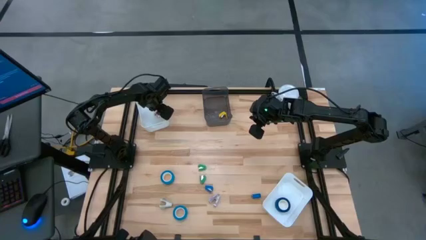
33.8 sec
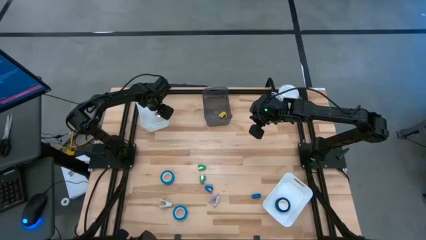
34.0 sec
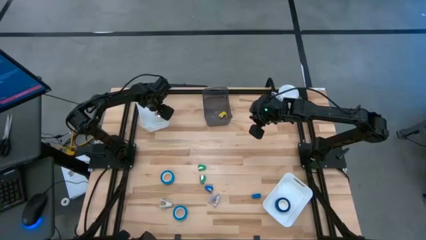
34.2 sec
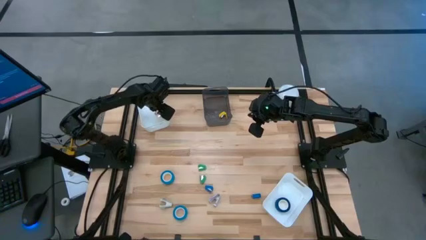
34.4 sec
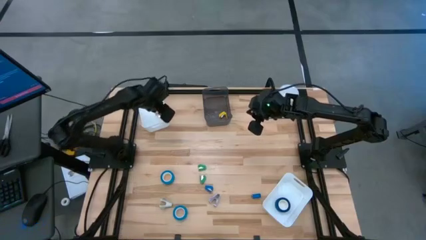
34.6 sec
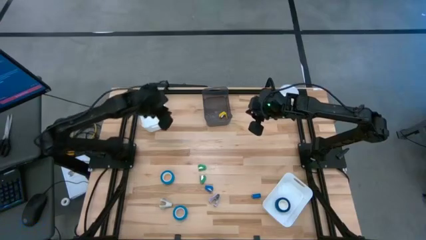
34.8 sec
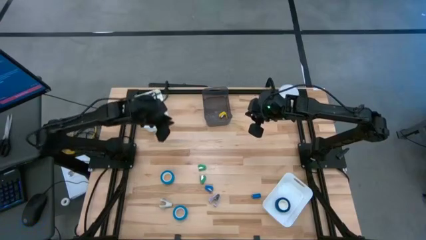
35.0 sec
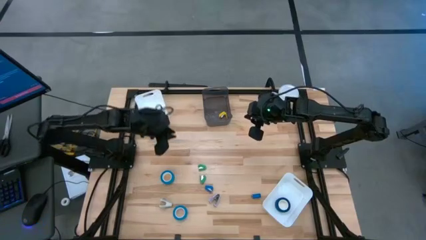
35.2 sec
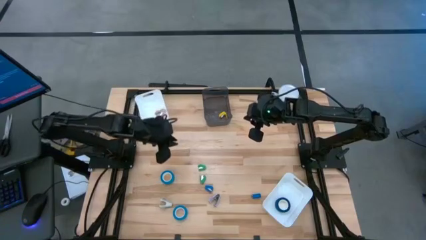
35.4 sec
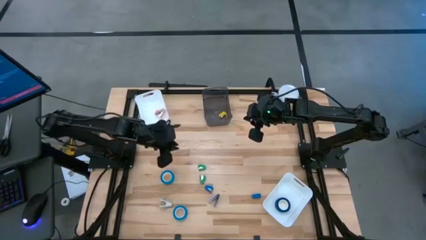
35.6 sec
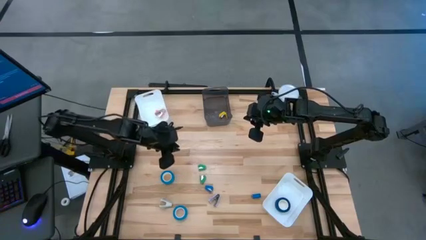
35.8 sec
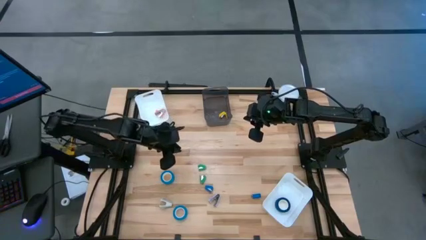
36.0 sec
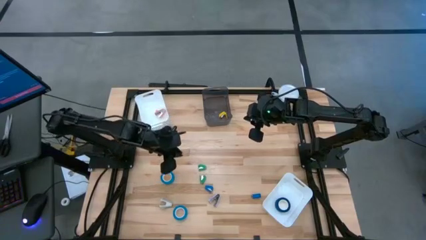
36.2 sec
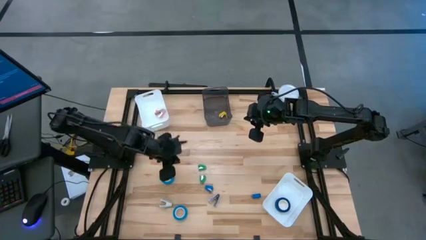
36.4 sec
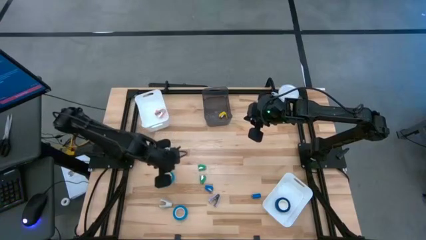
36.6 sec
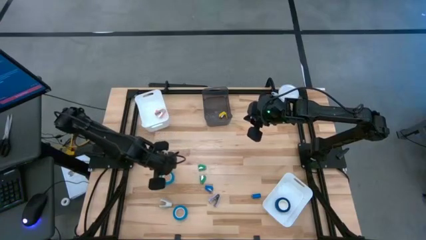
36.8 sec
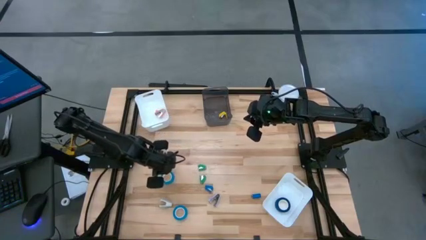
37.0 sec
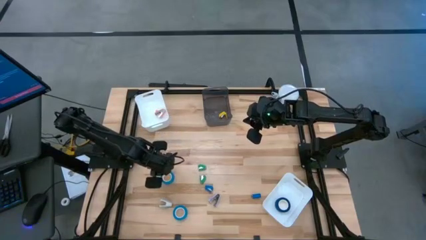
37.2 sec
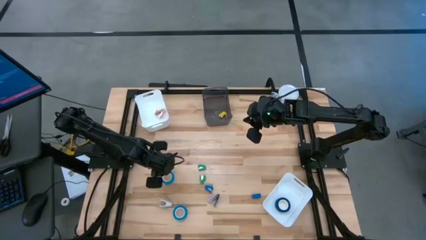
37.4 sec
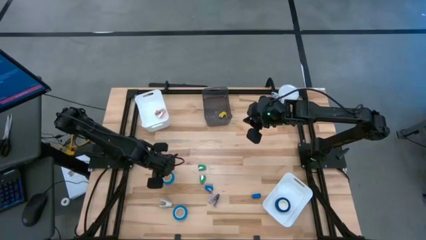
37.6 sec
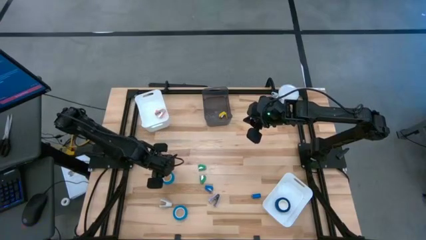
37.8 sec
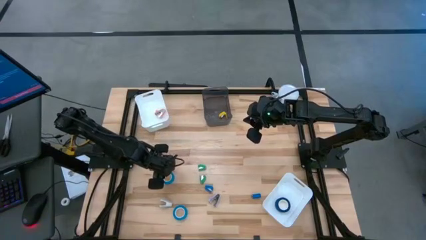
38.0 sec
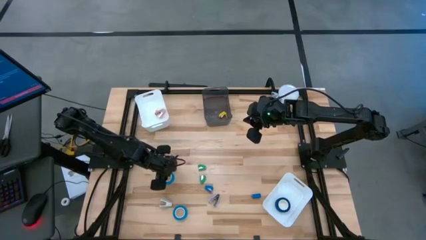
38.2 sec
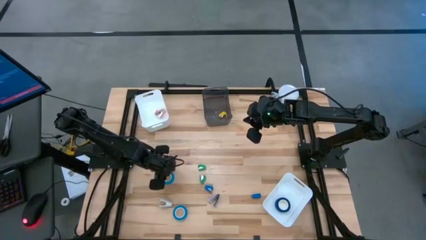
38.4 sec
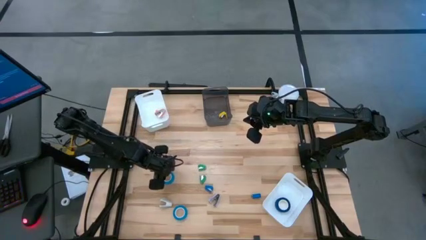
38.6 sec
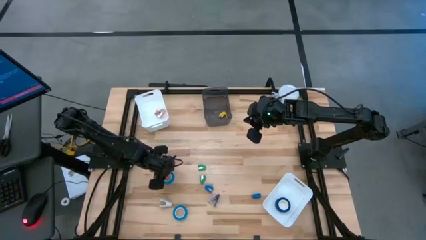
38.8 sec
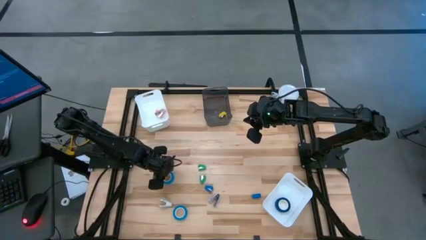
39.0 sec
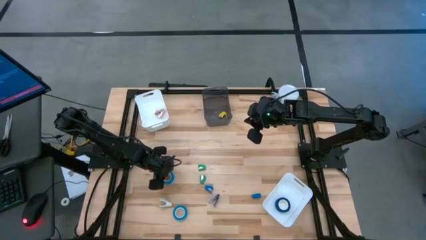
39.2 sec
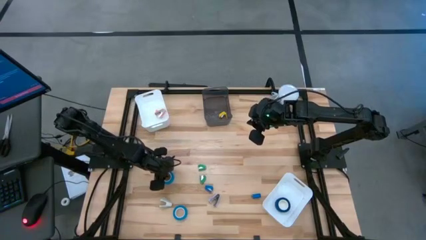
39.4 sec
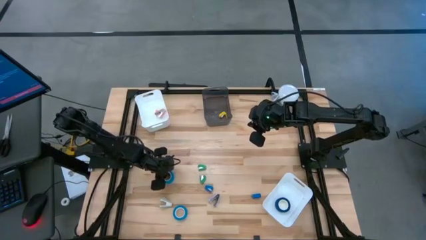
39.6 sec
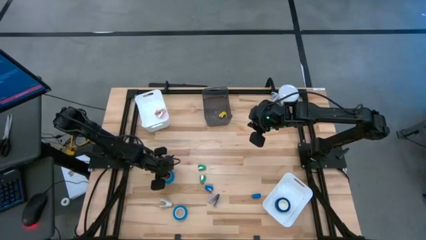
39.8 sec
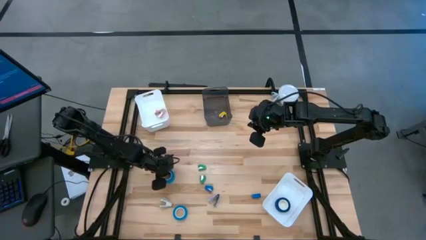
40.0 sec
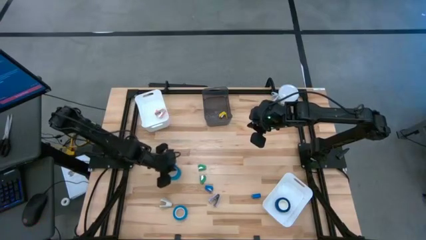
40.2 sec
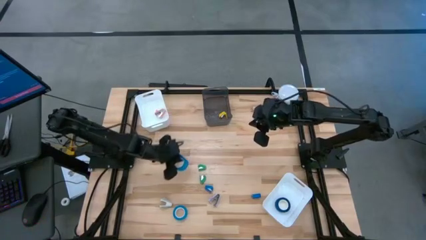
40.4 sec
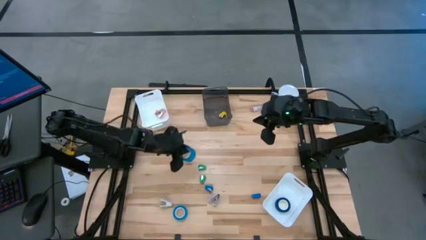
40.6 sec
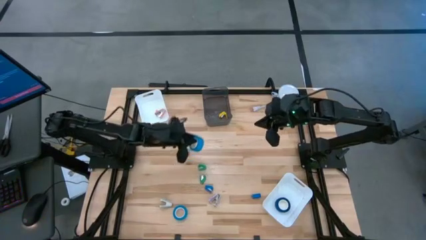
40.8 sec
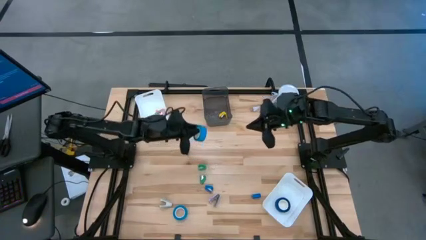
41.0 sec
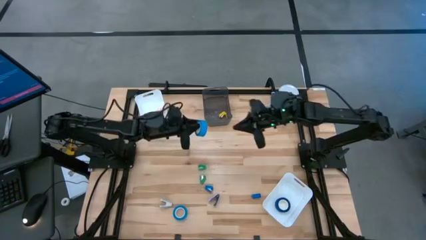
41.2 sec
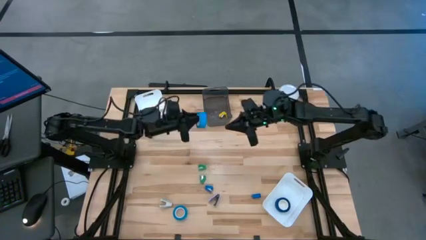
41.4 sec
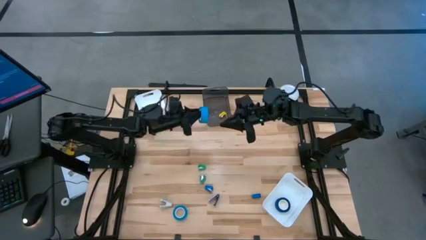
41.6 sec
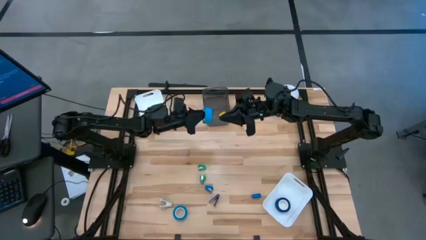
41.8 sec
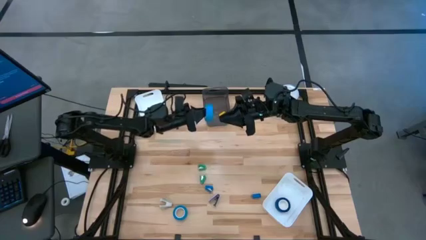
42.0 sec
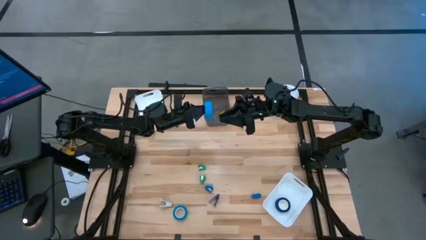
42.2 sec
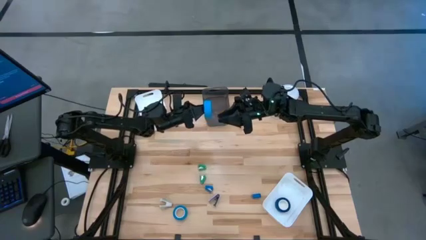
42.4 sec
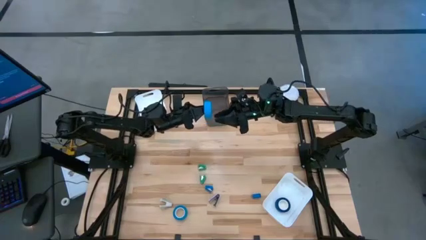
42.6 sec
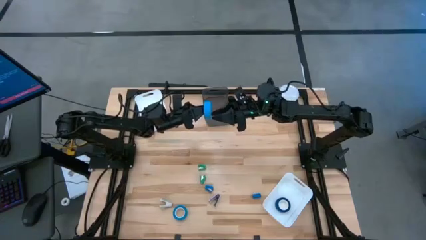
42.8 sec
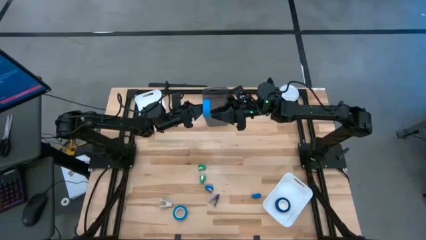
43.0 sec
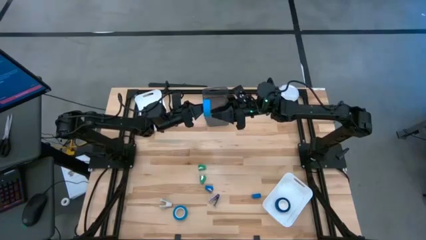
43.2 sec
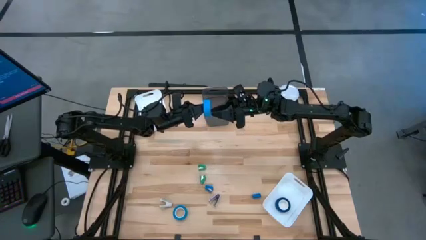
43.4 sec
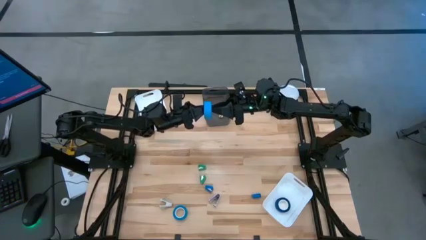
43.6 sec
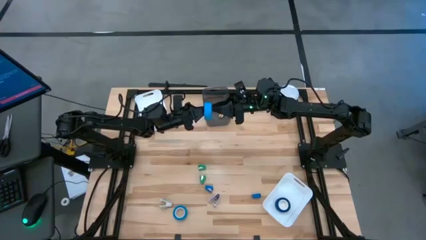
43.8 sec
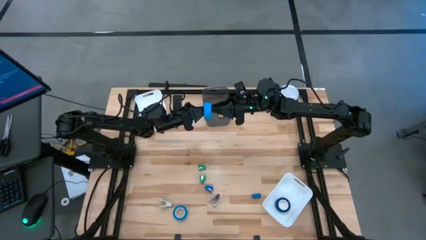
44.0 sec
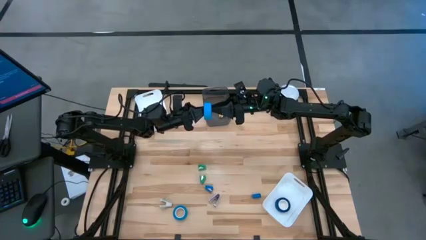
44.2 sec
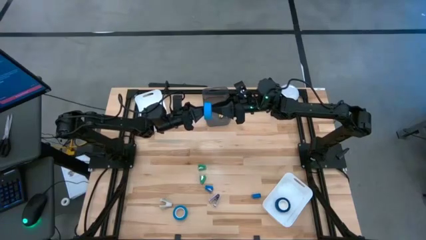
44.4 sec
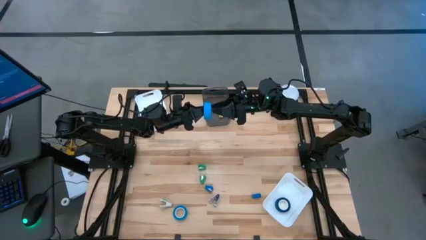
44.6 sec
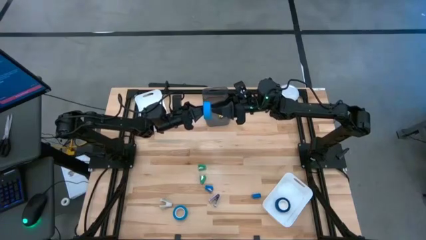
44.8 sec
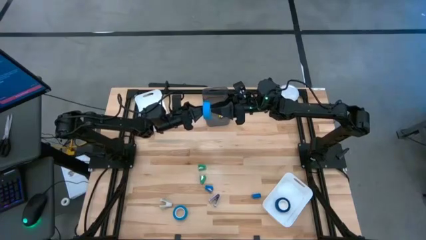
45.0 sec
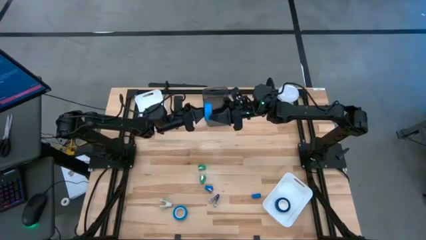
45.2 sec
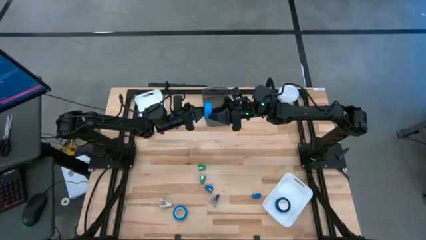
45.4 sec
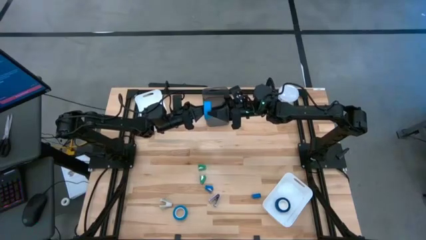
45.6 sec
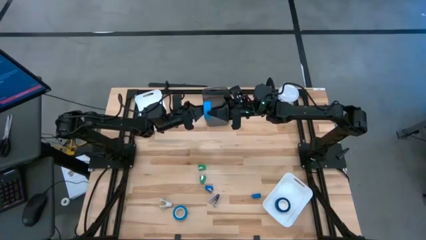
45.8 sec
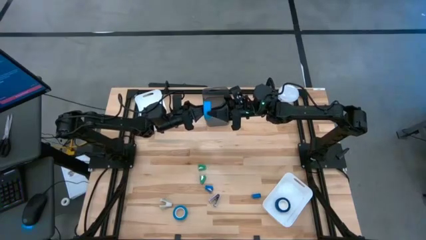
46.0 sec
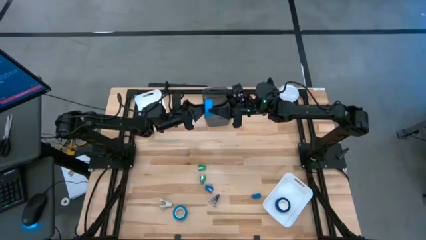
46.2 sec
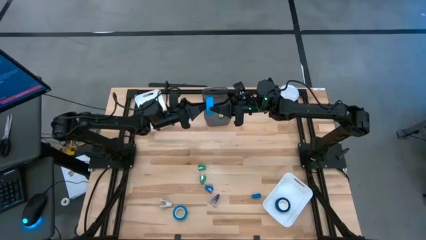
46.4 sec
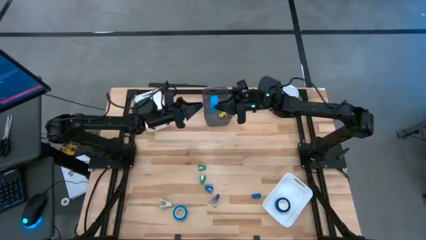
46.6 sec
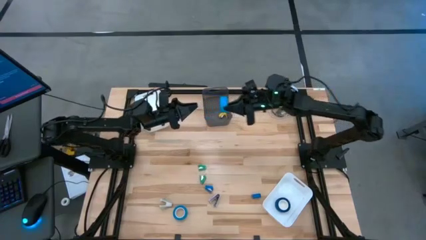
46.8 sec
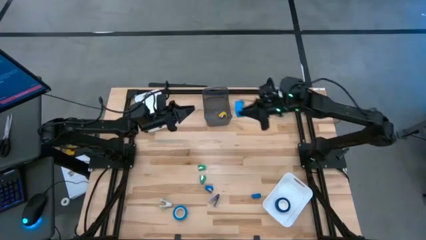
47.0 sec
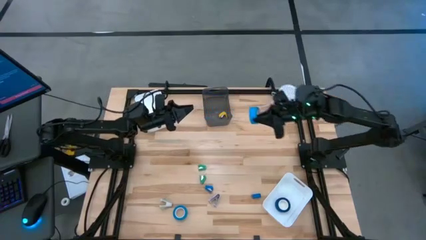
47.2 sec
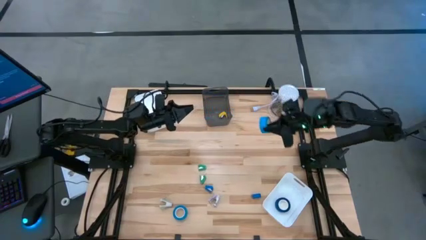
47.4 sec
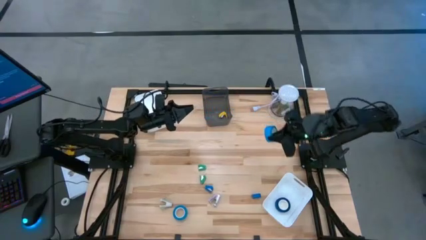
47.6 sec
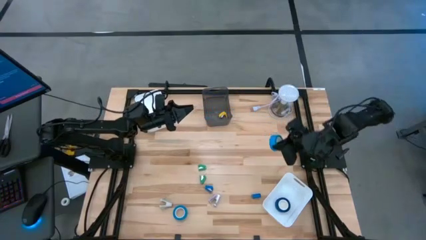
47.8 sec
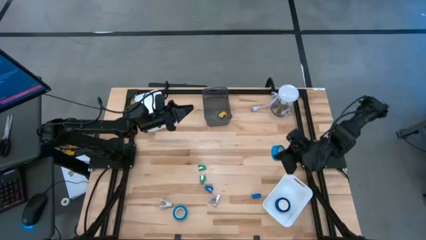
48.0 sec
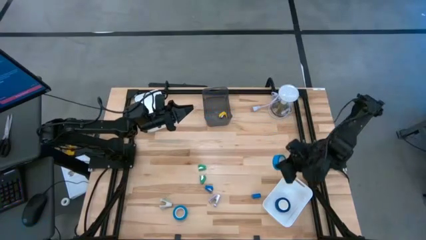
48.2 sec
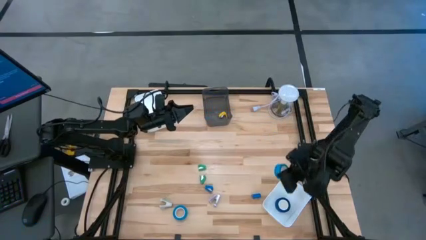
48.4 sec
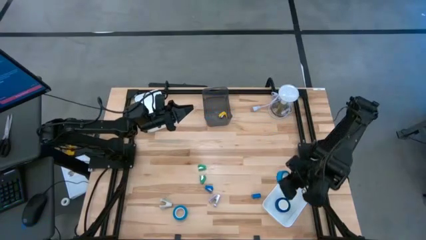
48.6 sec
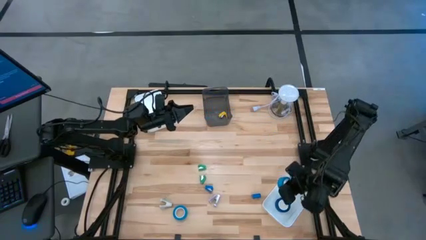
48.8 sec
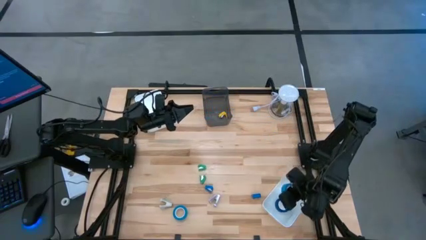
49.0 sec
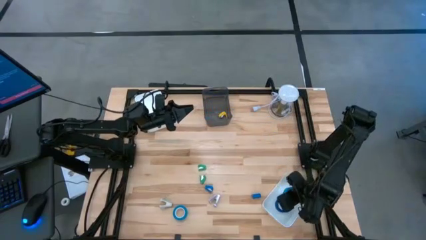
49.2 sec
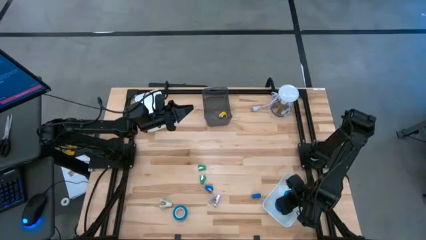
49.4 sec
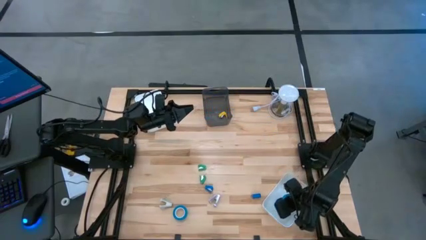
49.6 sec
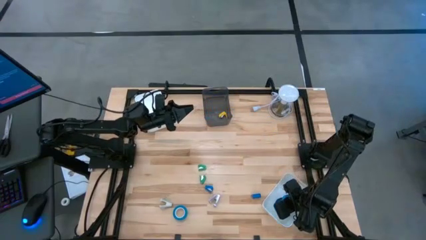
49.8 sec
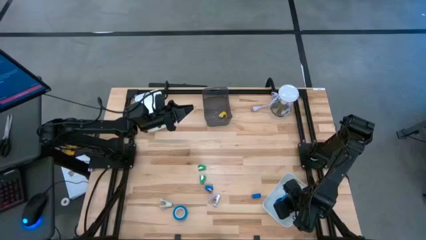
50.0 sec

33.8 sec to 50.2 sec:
Task: Pick and place Stapler, Stapler remover, tape
Put the top light blue tape into the bottom white bin

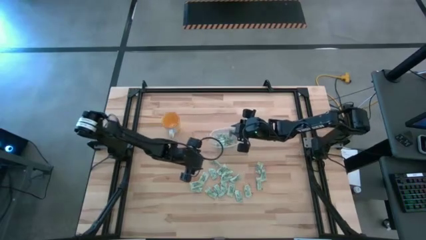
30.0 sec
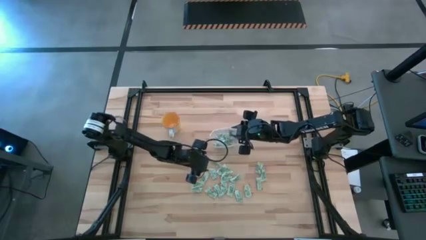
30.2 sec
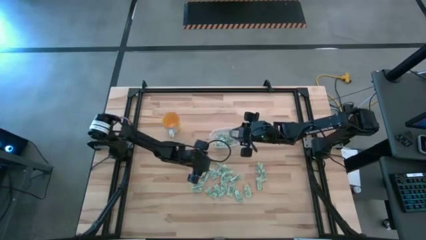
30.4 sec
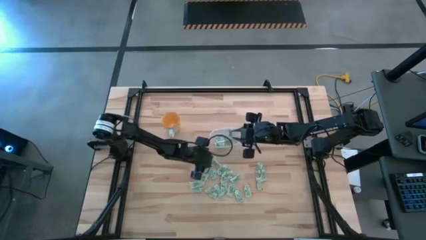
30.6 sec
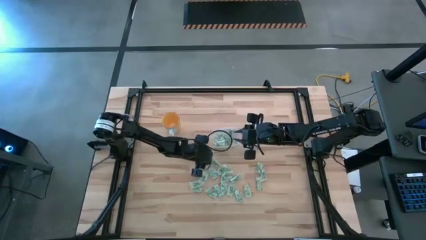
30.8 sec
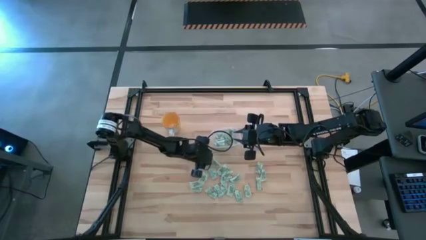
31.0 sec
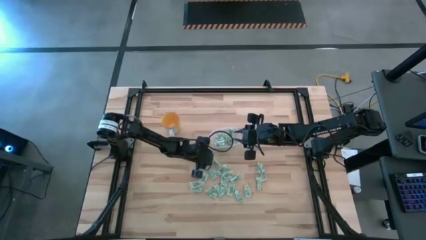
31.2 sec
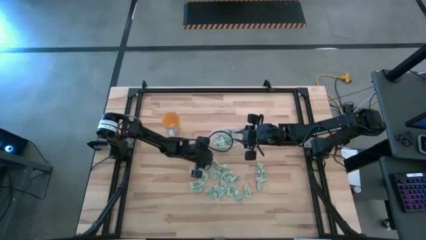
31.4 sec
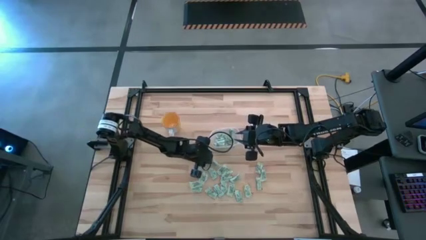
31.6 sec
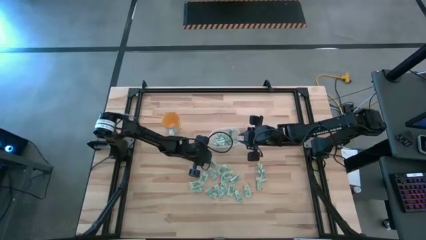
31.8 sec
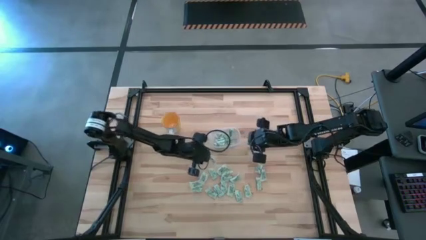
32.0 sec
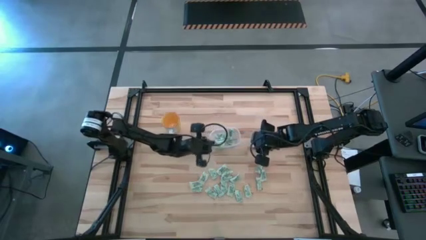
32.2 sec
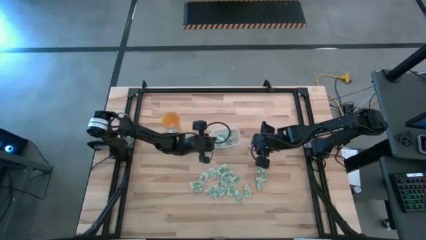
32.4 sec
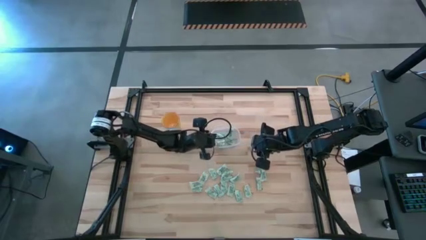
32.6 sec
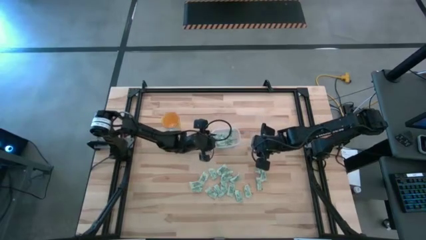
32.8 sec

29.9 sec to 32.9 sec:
Task: Pick and place Stevia / Truvia into bins
Put the stevia packet into the transparent bin
